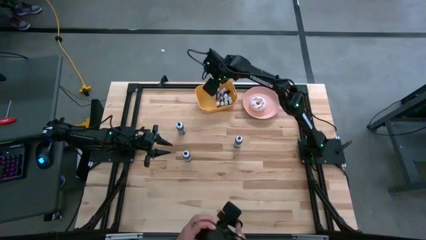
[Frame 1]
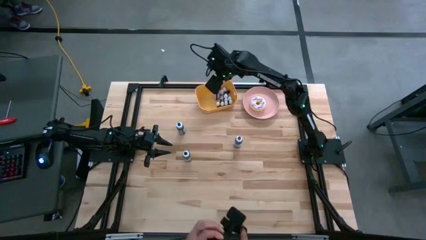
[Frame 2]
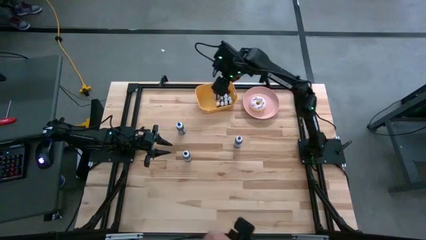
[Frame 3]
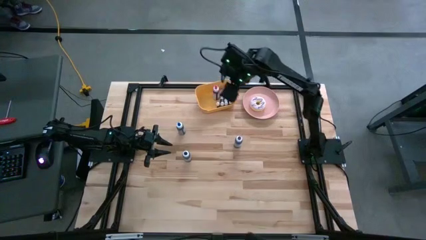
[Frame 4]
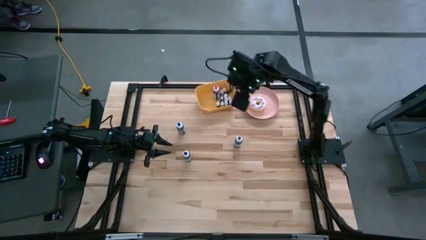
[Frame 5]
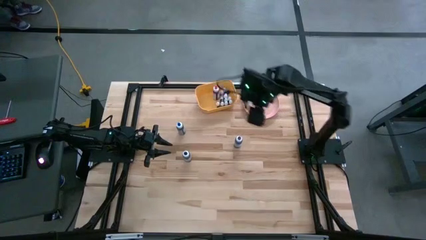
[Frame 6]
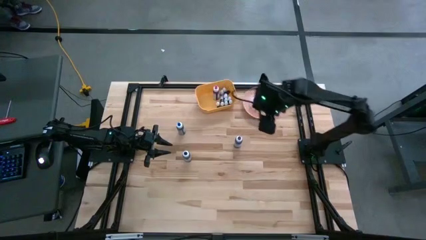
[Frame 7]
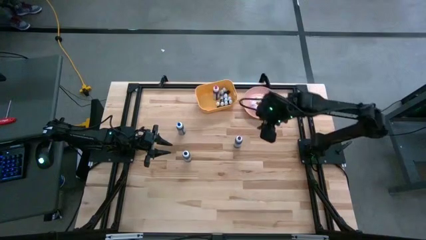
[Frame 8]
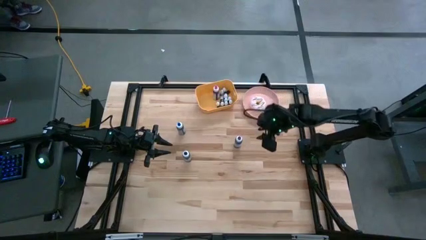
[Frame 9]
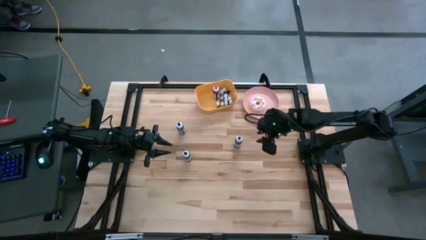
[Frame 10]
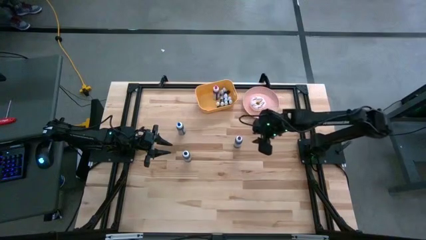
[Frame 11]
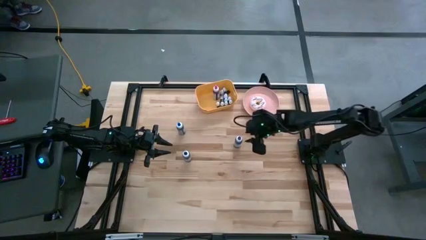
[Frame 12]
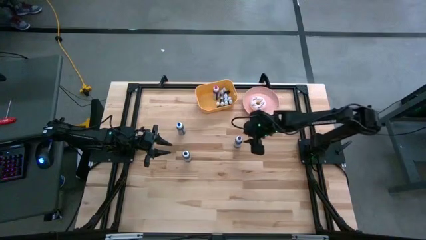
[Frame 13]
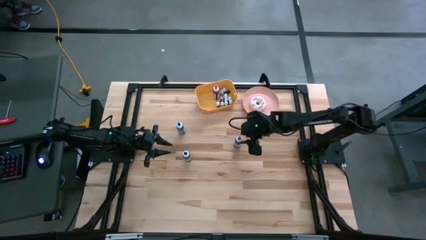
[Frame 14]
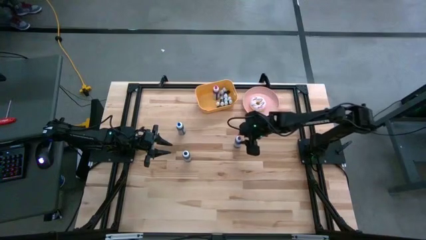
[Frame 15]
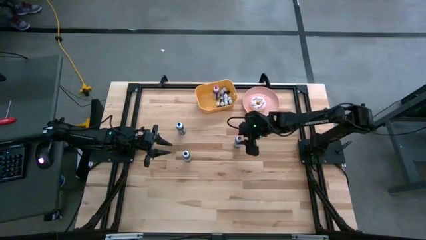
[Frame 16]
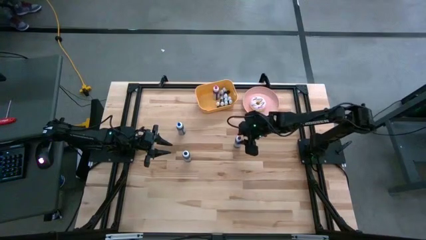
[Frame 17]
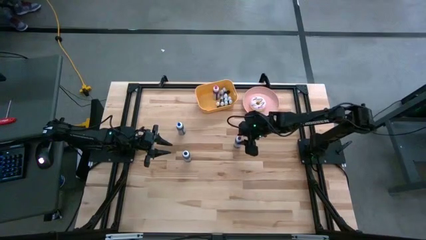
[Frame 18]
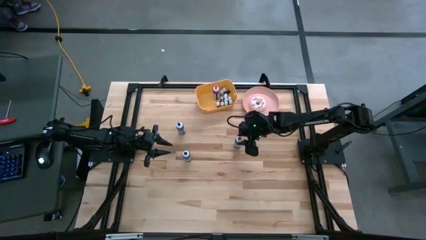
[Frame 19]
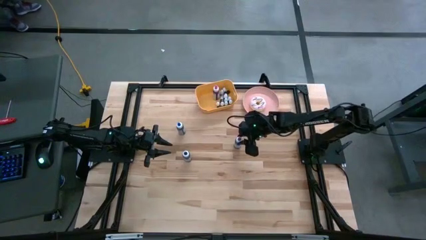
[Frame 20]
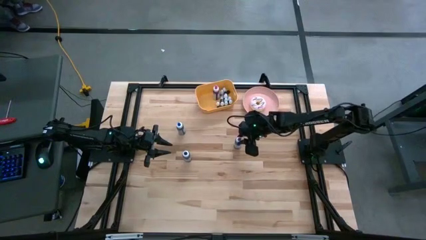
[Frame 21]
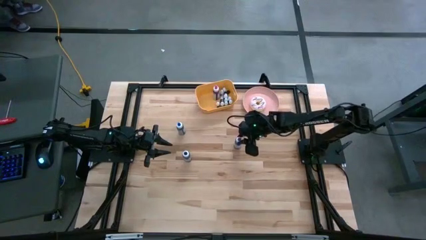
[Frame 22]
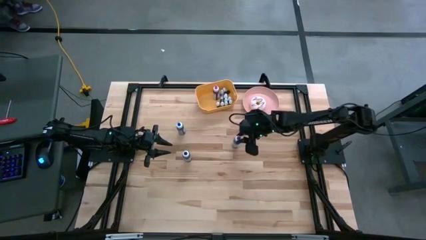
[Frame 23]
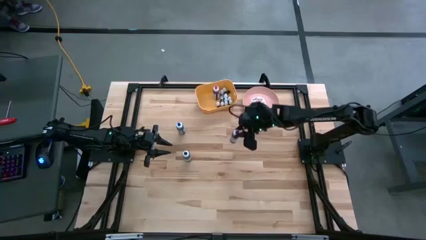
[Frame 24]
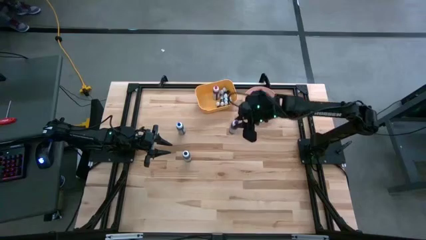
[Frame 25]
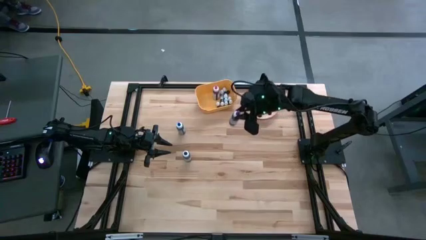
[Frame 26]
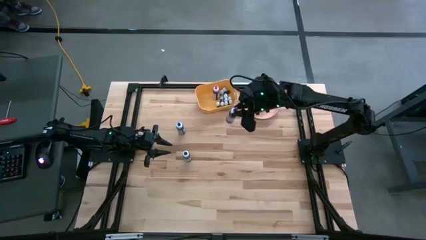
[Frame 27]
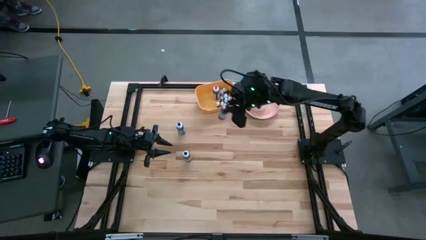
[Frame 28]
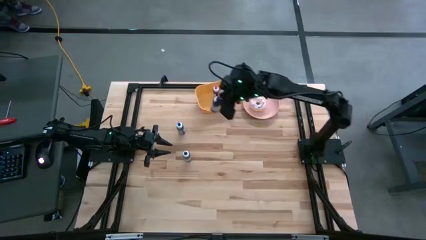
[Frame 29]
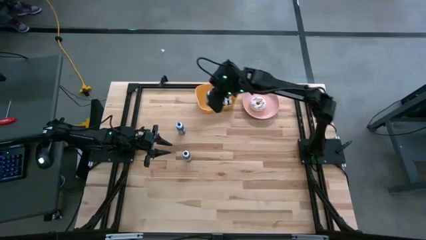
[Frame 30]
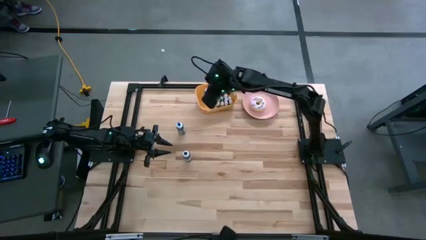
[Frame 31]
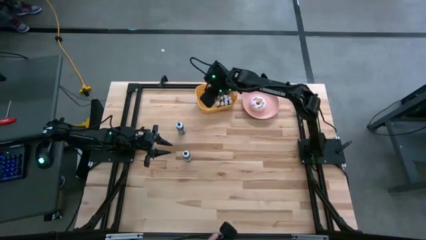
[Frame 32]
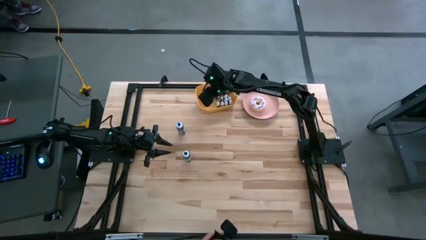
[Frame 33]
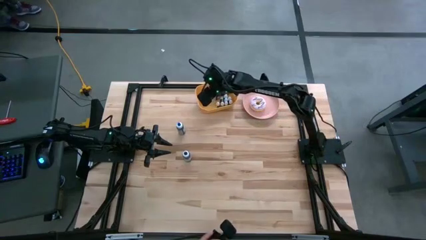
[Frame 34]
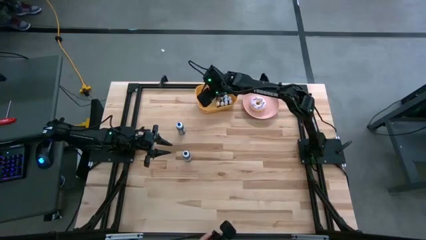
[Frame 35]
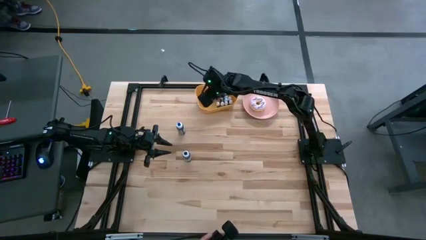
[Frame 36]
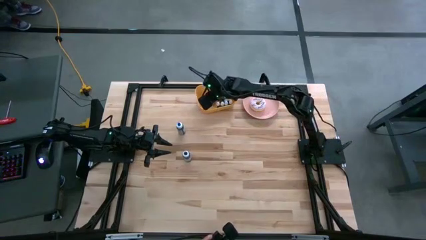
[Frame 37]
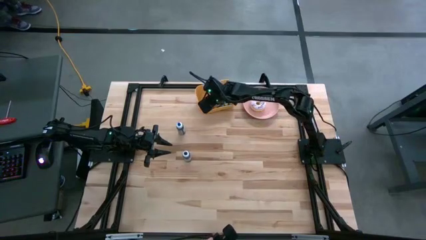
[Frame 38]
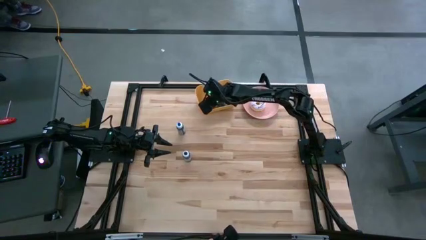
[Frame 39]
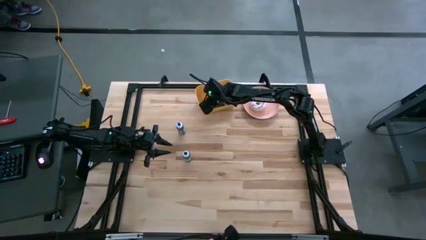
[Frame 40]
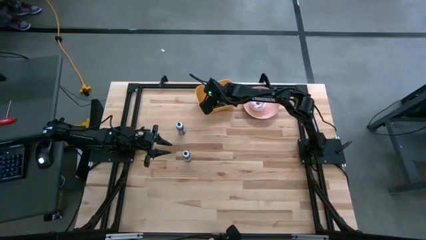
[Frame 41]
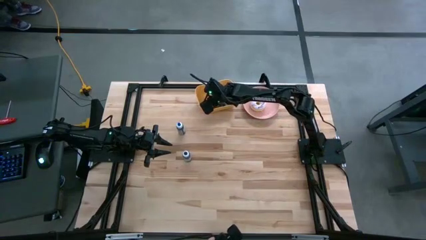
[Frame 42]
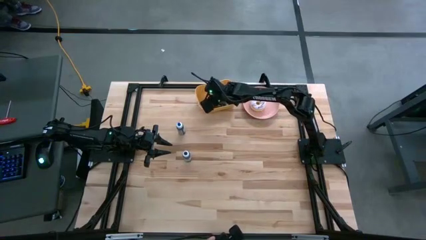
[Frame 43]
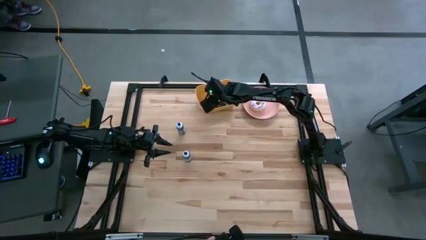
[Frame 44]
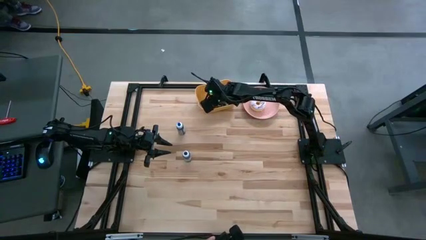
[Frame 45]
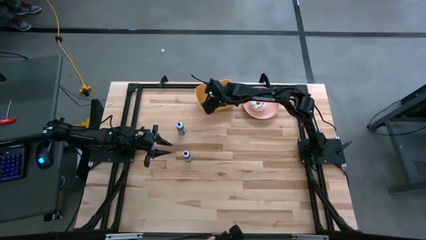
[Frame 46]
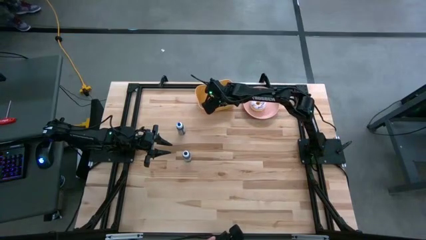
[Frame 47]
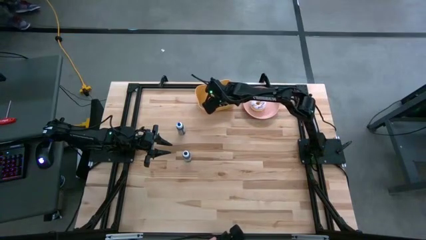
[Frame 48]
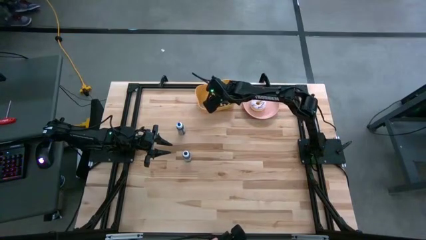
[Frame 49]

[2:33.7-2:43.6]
Task: Pick & Place food coloring
Put the big violet food coloring bottle into the yellow bin

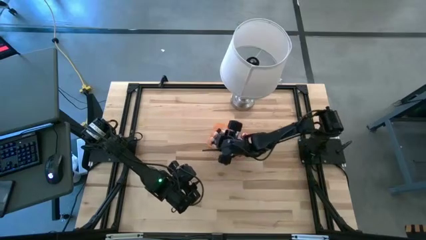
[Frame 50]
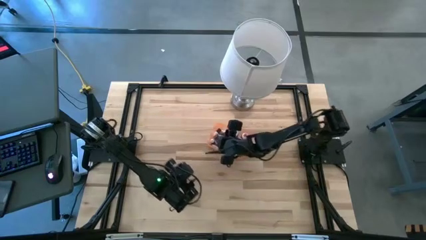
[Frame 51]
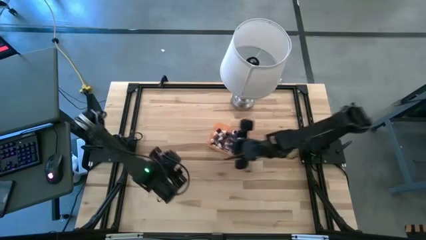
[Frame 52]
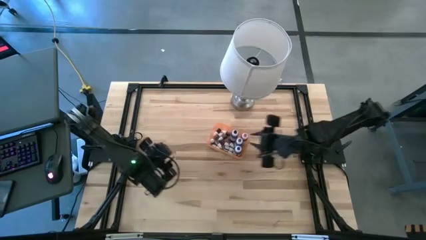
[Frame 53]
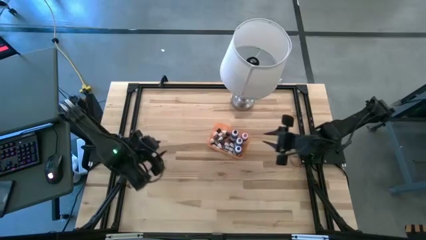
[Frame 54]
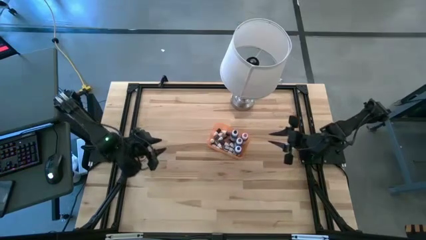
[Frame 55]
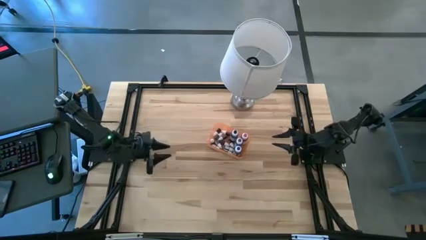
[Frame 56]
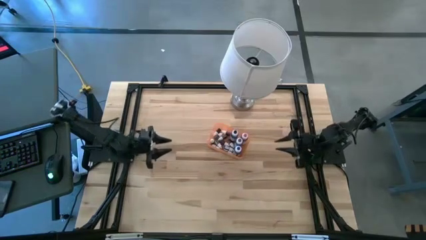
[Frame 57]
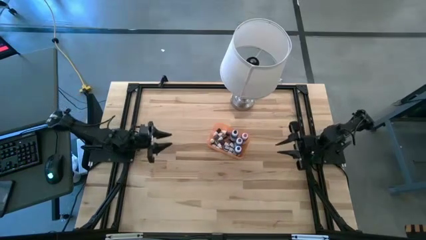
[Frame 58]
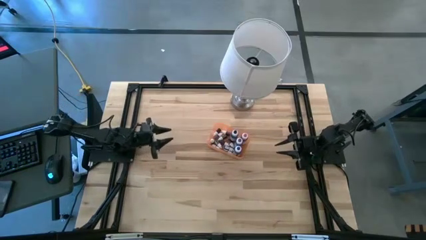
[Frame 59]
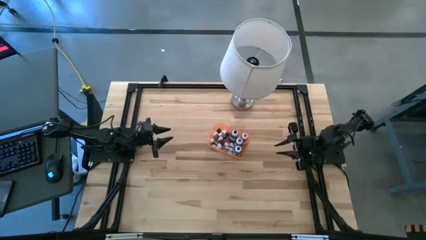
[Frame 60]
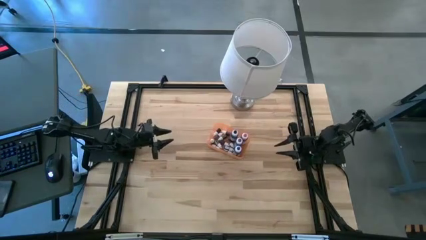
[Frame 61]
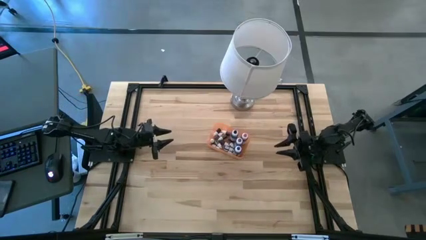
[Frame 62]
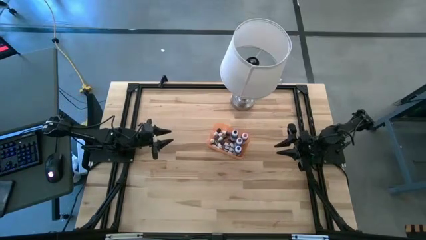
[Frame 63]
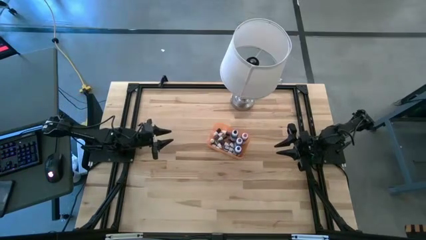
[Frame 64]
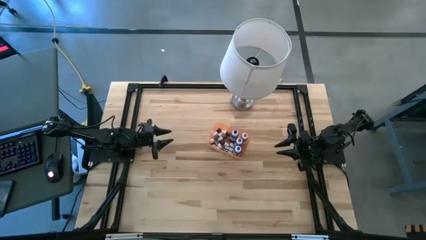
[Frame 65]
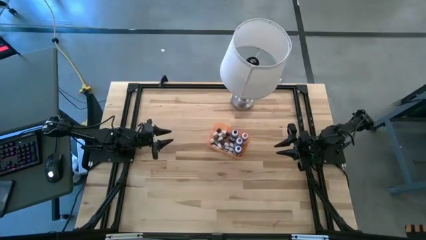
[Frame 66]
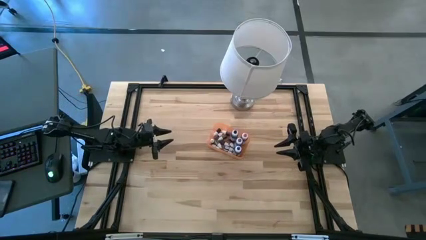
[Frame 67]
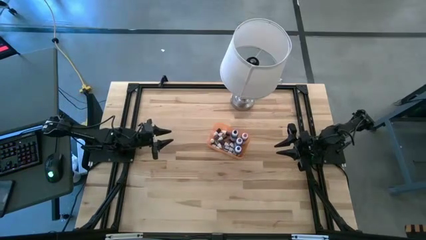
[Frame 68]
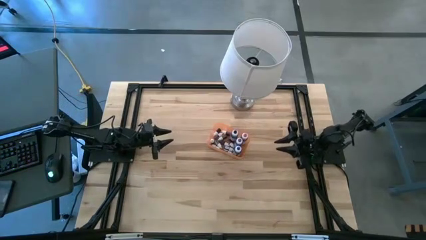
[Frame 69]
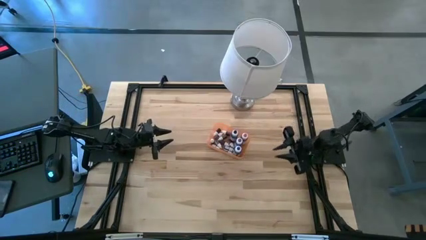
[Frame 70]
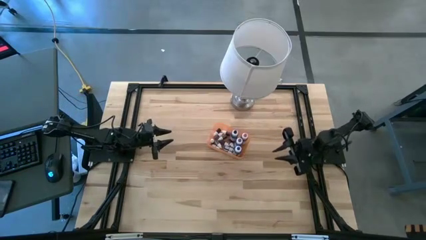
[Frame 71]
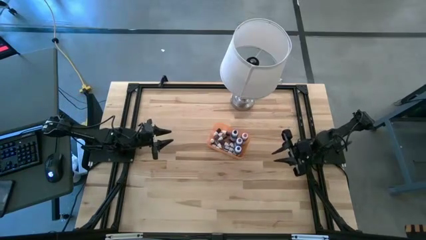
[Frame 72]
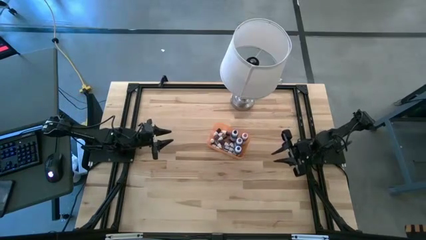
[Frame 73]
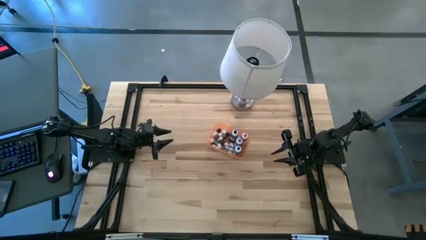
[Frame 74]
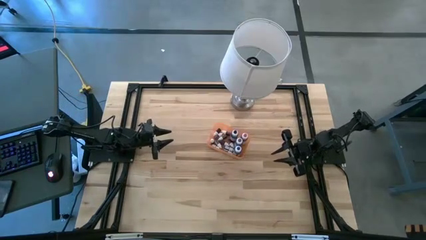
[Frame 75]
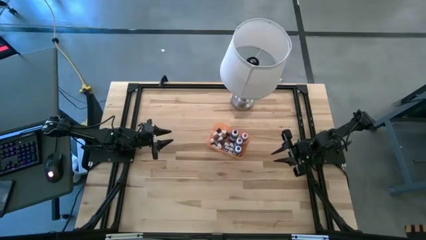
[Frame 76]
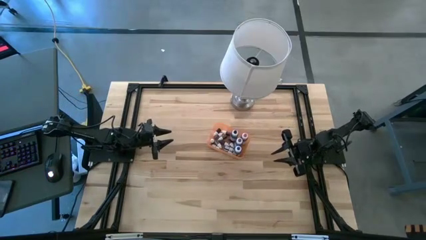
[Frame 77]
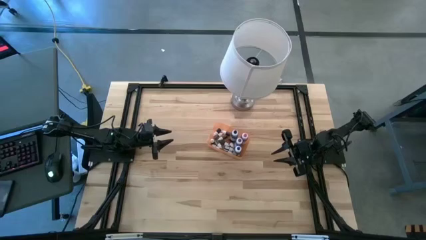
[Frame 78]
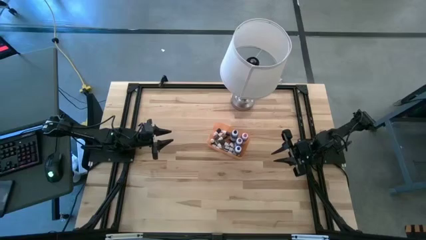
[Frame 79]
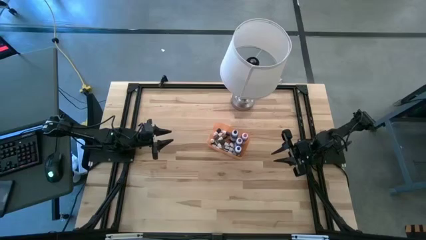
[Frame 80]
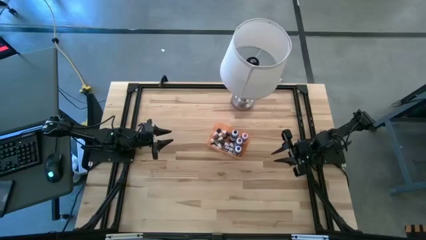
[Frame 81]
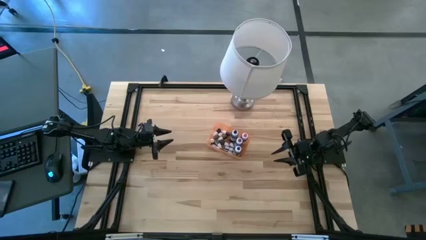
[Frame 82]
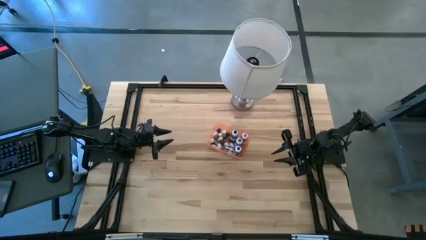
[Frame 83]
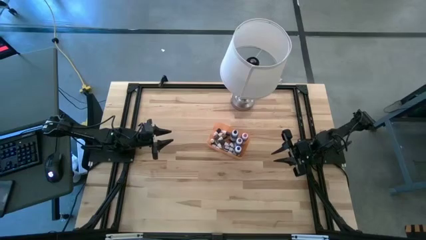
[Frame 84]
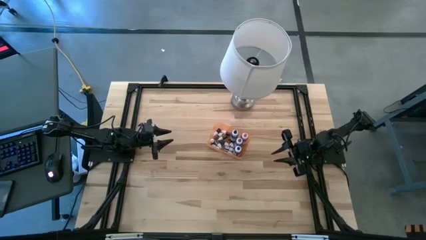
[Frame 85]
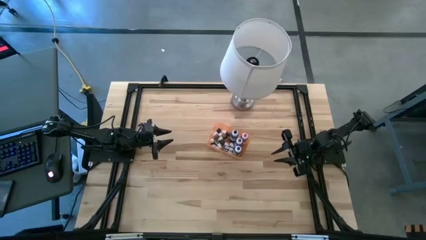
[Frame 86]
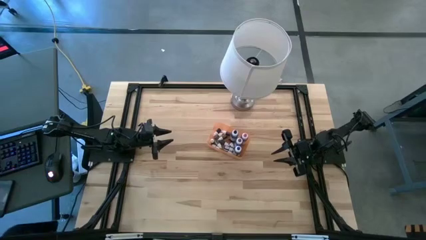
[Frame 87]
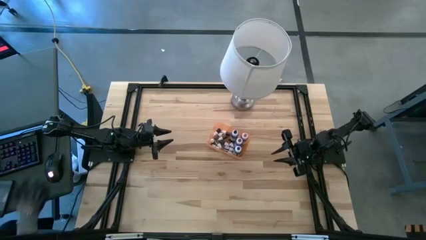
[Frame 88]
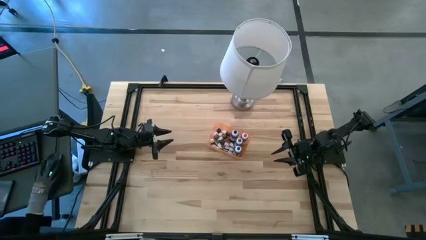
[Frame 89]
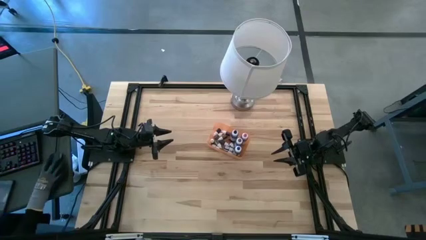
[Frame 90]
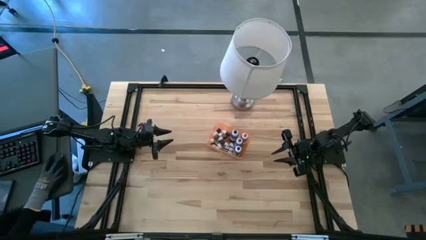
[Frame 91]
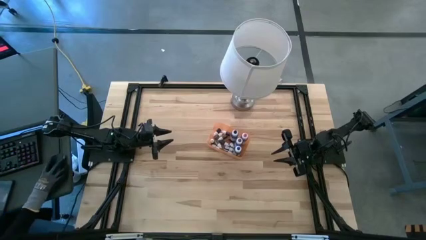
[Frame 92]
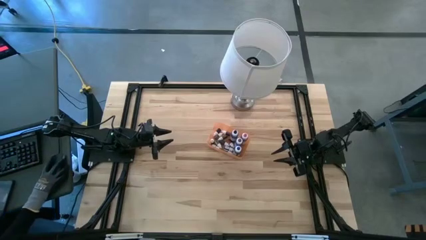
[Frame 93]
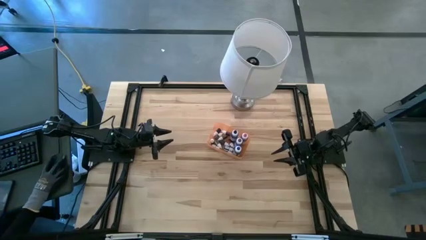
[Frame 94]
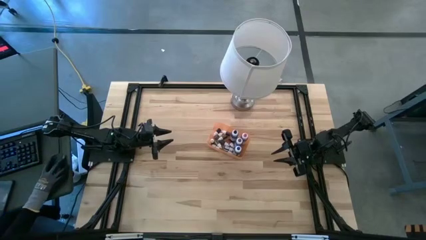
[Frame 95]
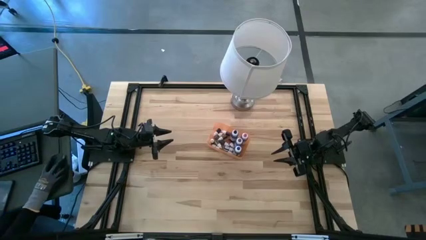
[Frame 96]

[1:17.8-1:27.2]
Task: Pick & Place food coloring
Return to Home Position
